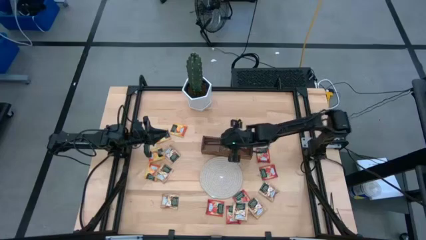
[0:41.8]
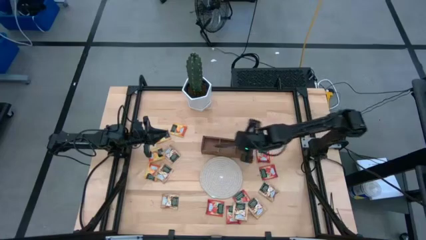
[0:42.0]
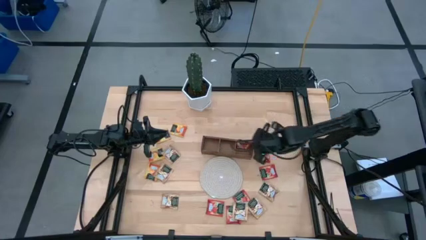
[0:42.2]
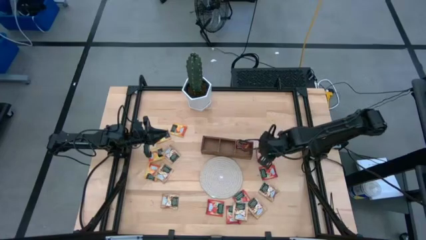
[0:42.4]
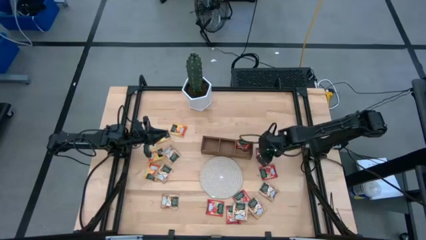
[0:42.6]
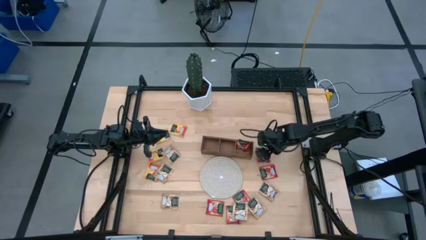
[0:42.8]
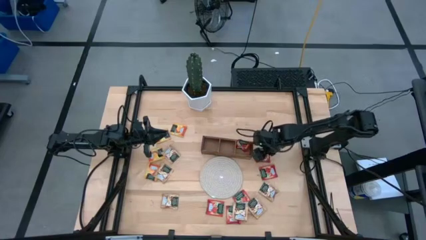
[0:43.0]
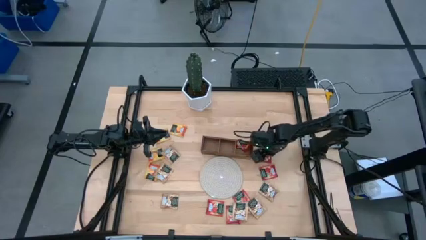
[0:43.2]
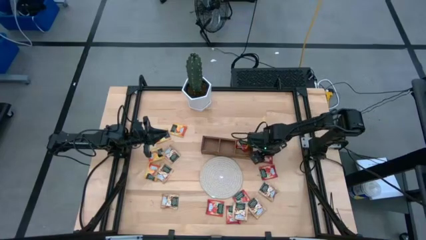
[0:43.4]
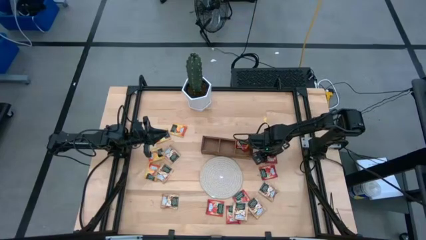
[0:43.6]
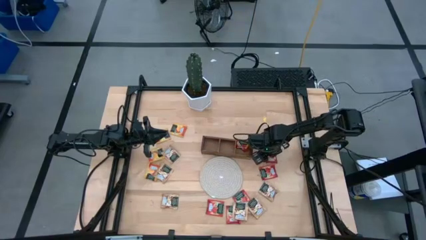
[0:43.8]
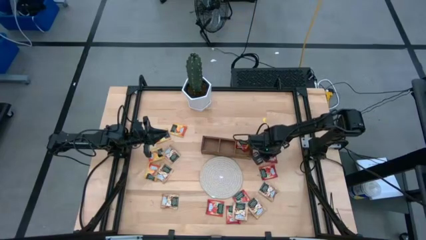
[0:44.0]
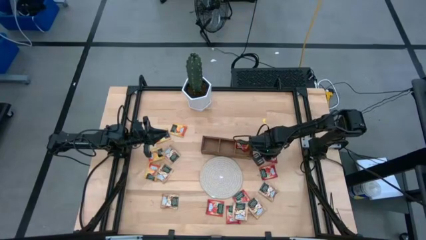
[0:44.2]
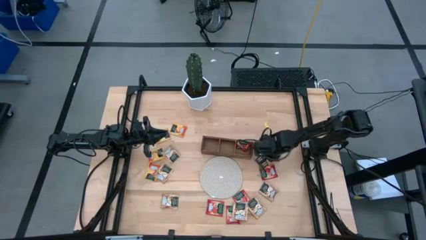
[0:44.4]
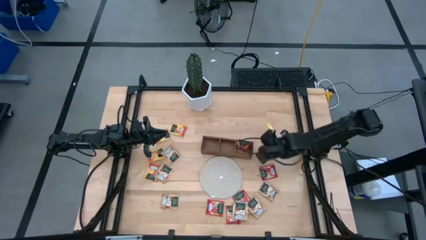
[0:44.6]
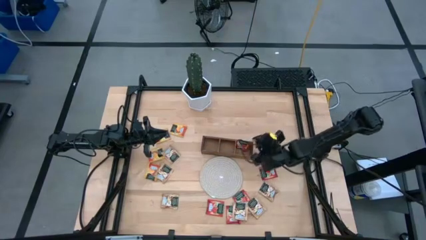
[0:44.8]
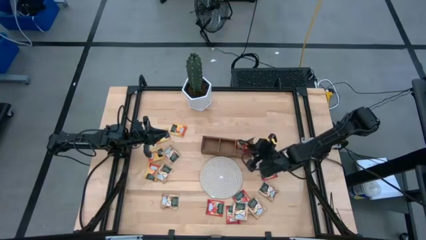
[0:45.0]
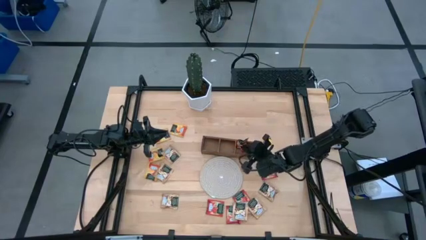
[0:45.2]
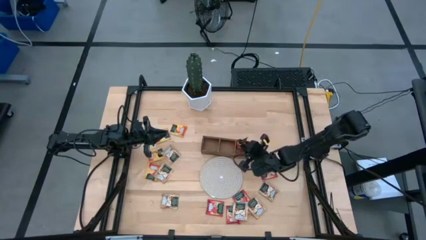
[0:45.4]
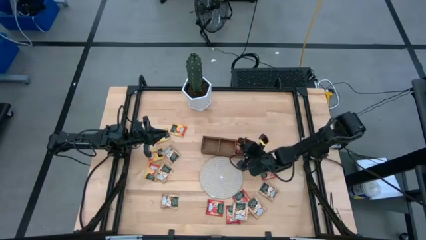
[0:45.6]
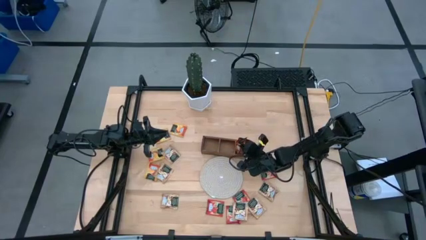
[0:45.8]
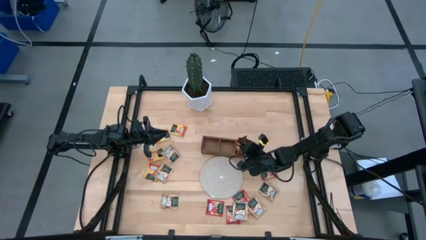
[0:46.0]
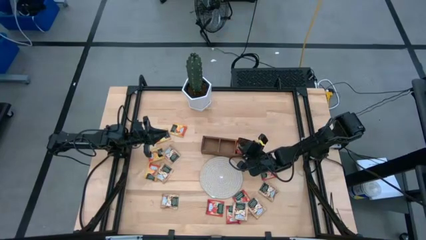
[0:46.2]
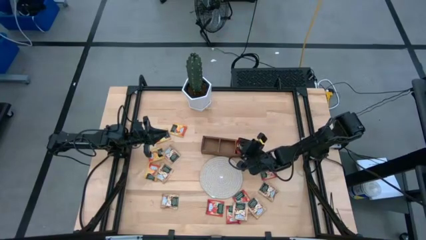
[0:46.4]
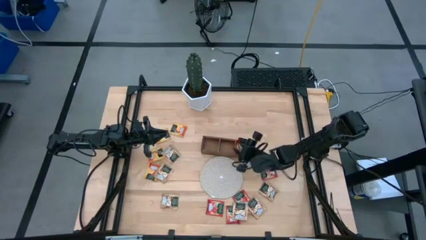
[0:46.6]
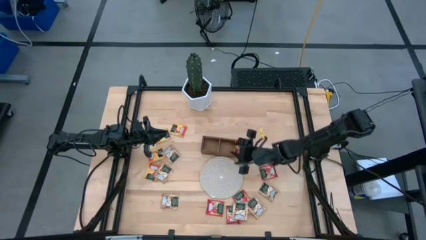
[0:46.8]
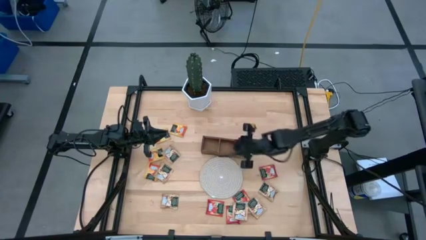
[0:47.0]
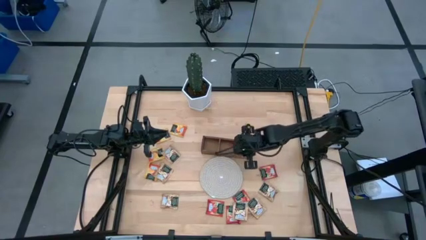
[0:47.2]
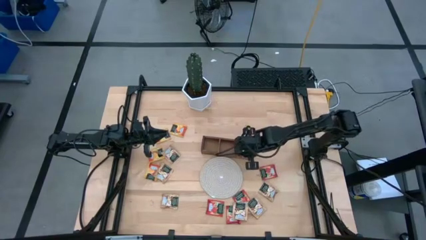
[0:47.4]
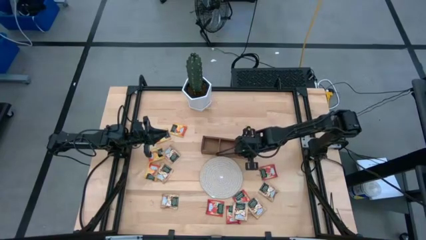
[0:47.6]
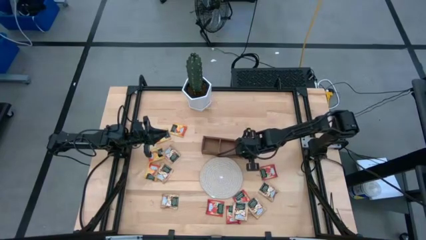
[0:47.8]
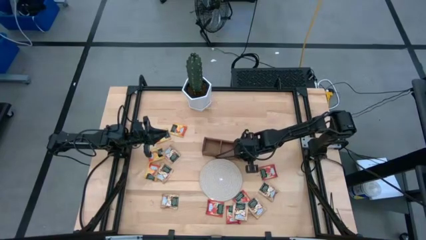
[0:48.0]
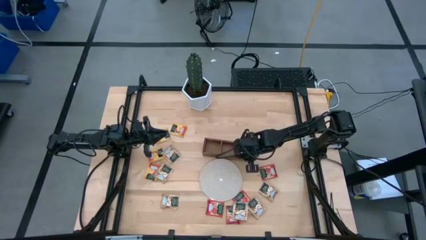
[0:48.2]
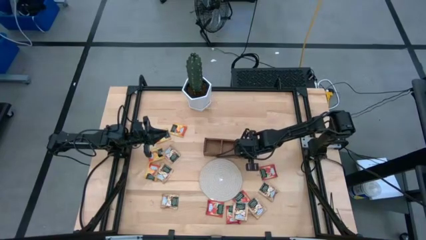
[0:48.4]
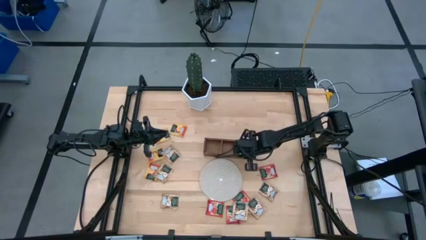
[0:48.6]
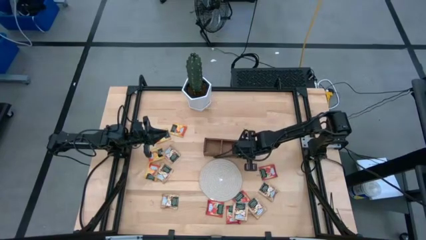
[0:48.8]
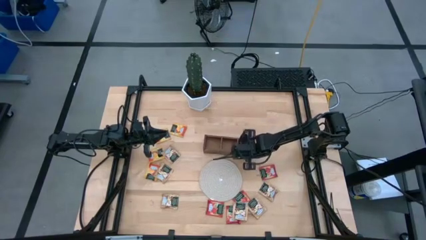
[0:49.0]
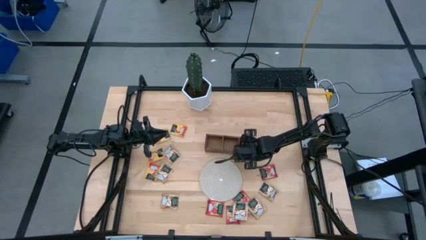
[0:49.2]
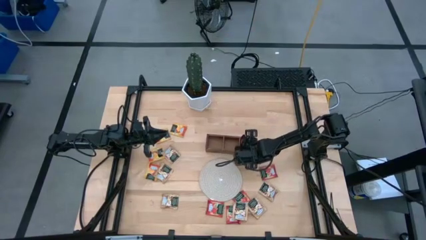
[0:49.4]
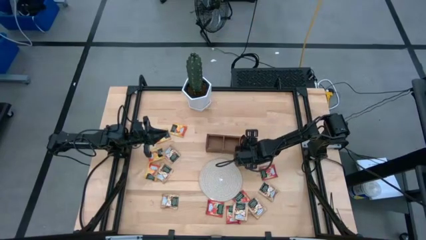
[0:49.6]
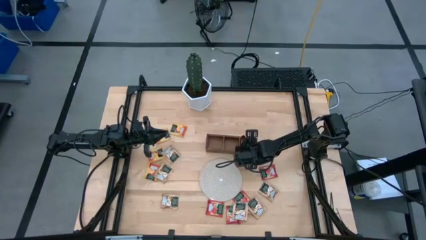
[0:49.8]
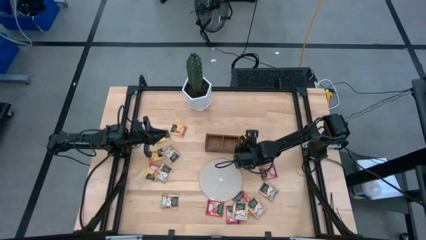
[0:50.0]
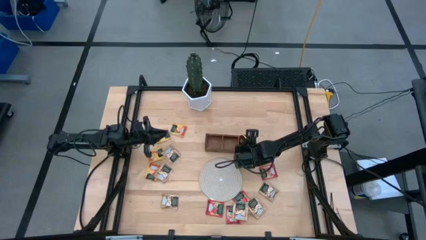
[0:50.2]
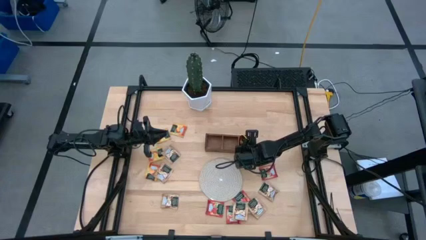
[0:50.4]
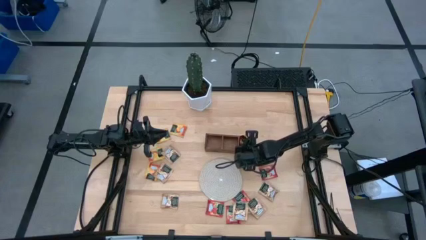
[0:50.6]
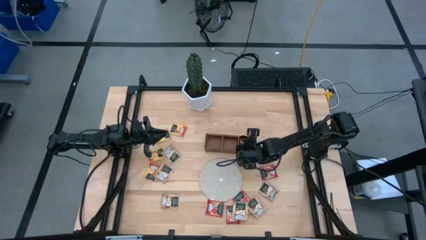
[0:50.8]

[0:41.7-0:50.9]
Task: Pick & Place Tea
Put the red tea bag into the right section of the wooden organizer

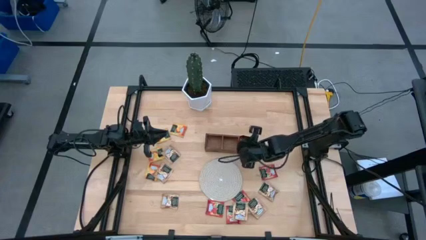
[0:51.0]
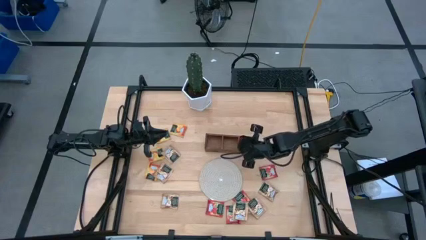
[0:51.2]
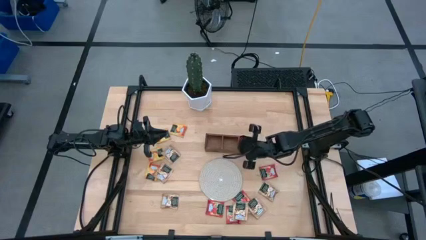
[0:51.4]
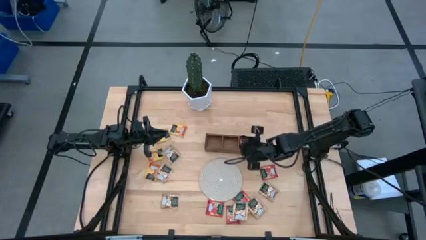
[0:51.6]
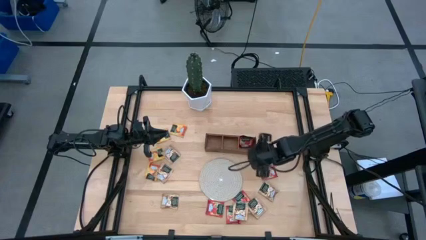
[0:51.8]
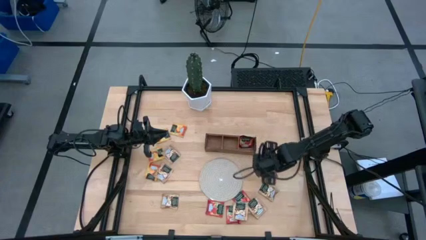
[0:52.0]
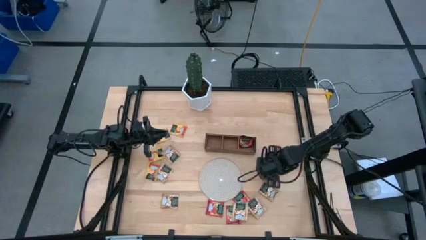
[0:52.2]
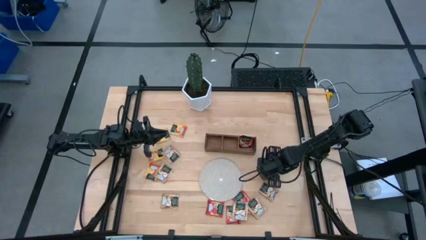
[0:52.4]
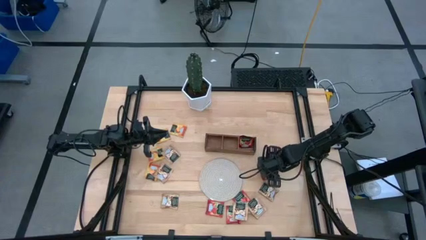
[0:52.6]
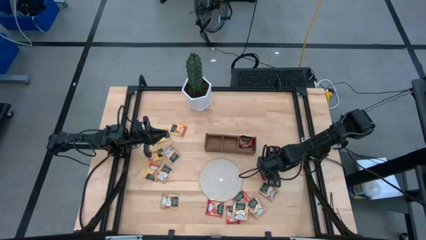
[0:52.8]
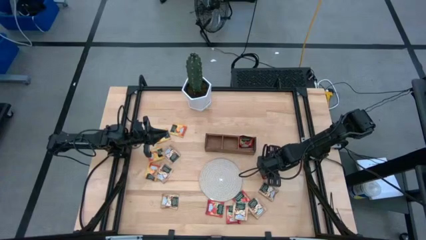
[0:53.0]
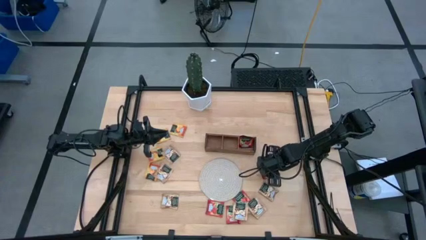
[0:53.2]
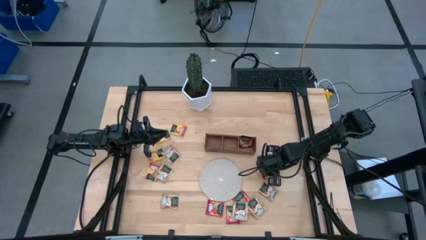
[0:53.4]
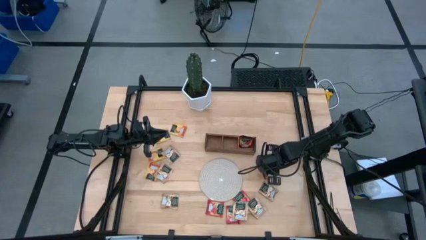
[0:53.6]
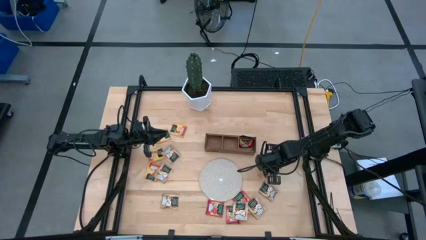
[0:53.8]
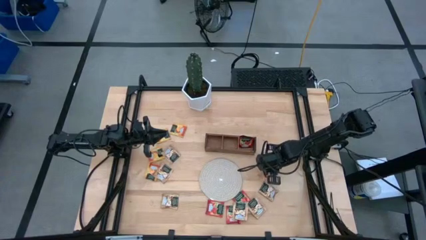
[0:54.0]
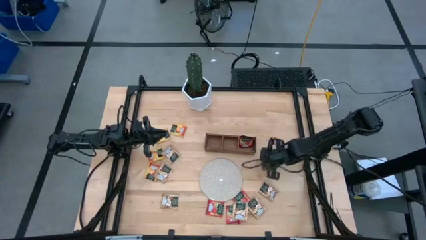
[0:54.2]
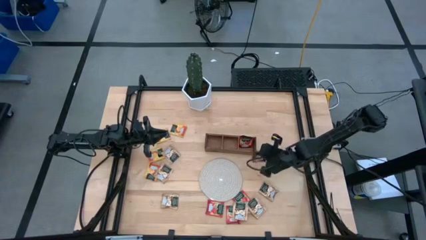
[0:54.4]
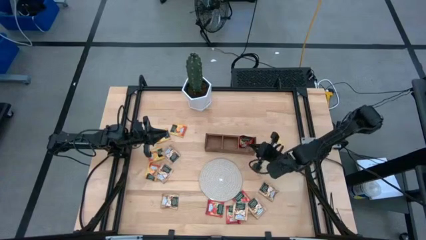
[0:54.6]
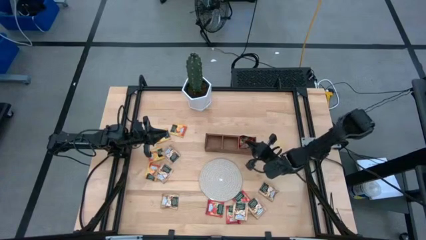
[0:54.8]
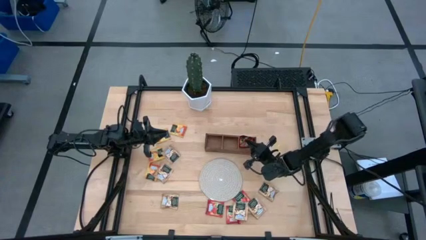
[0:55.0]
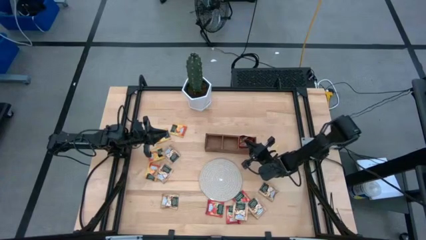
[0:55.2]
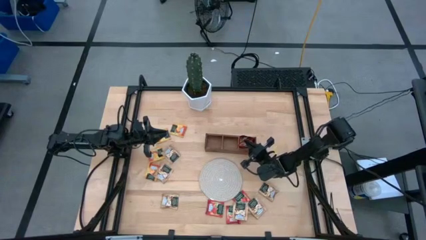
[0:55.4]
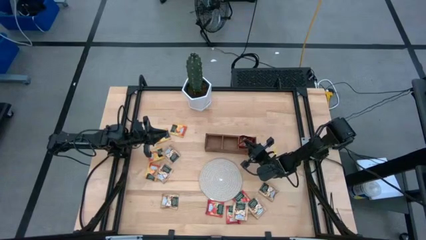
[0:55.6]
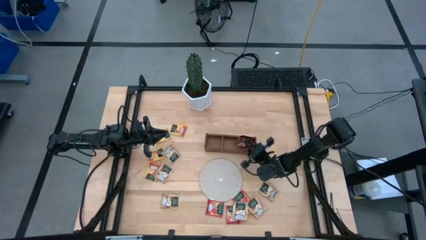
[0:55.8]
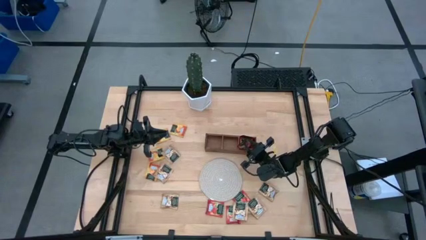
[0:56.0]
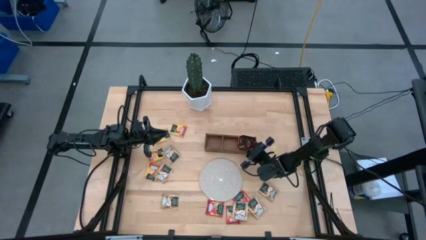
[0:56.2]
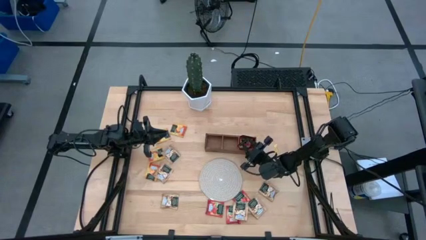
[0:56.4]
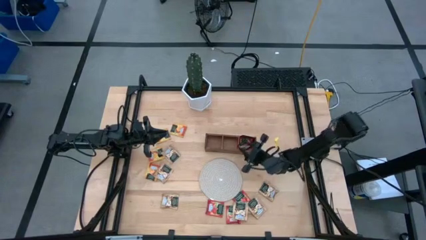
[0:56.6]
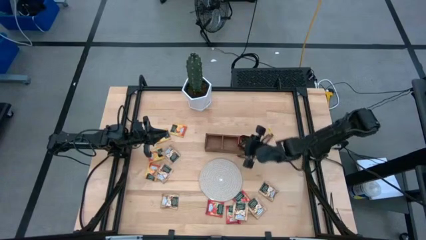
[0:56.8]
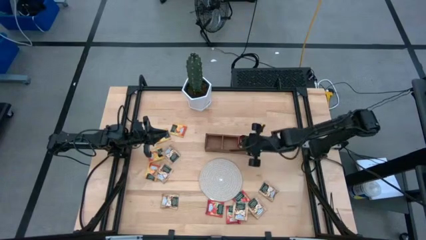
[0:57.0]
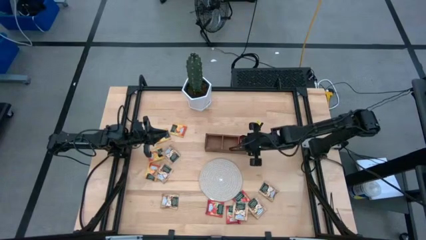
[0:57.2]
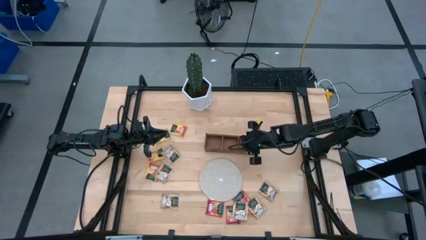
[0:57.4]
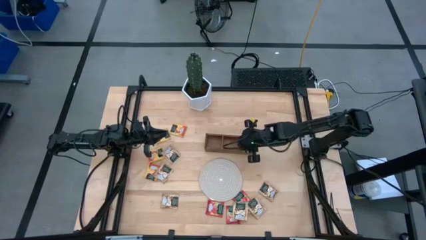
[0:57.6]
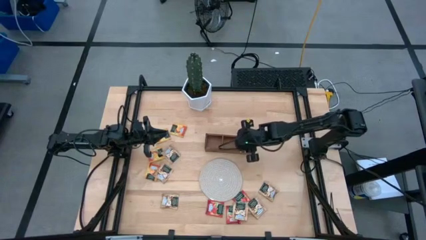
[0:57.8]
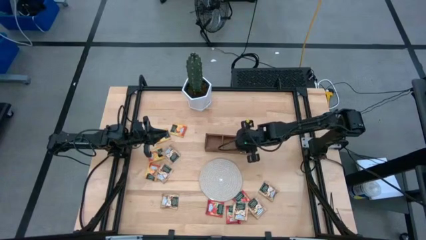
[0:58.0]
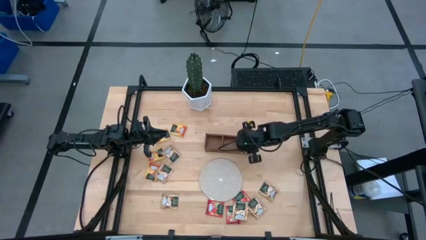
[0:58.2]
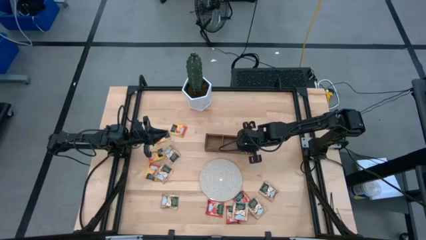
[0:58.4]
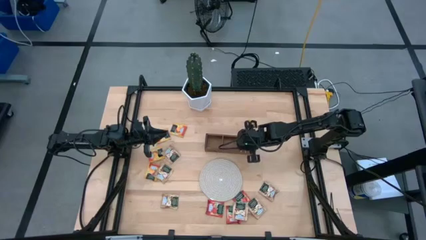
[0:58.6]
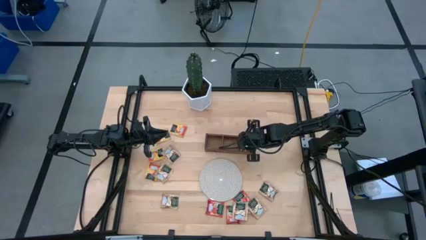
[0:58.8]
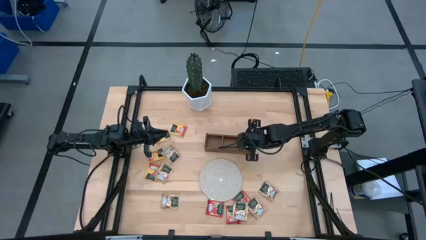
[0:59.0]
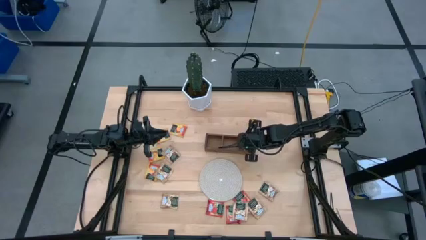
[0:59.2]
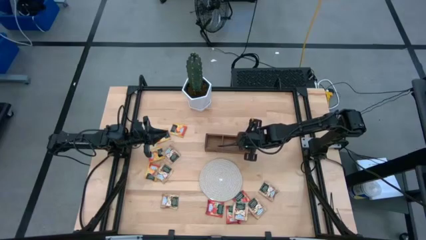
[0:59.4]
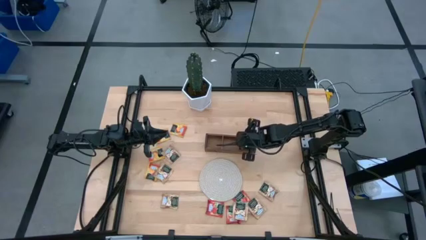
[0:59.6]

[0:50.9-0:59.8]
Put the red tea bag into the right section of the wooden organizer
